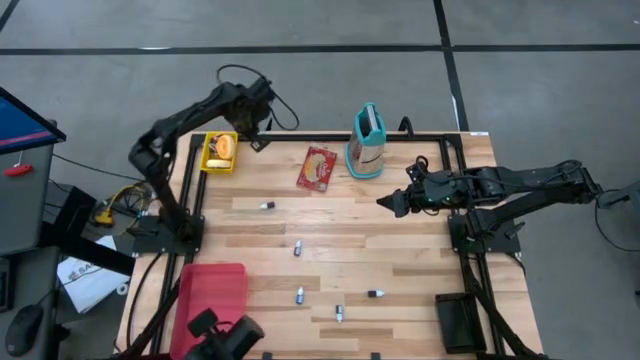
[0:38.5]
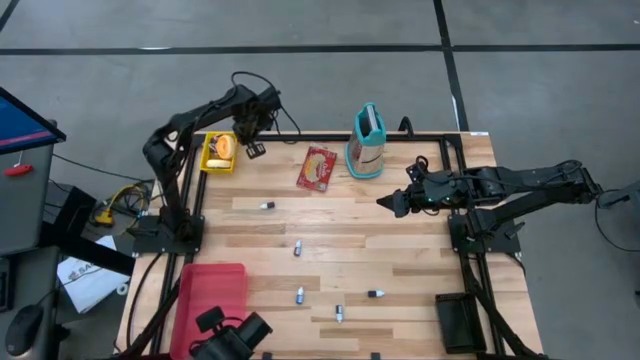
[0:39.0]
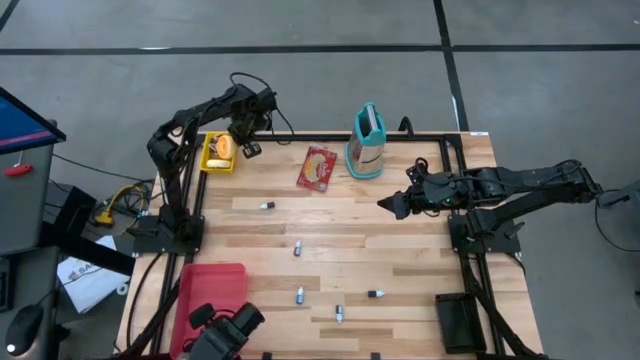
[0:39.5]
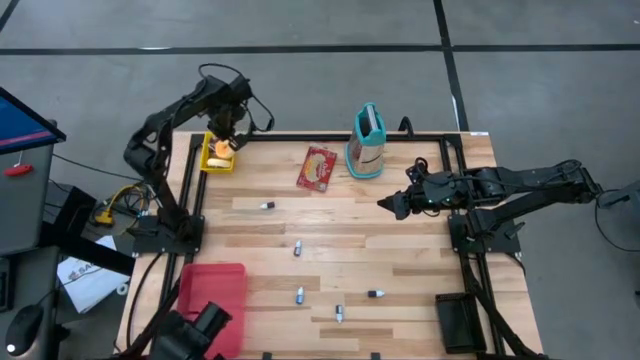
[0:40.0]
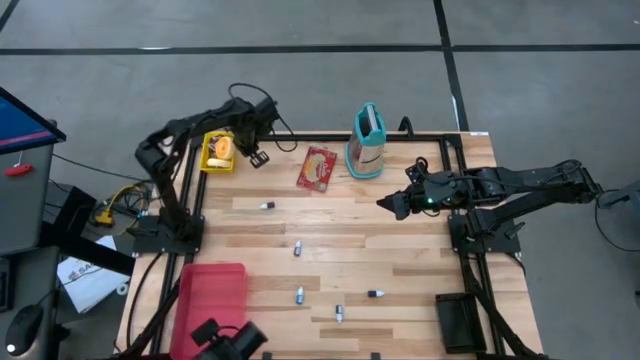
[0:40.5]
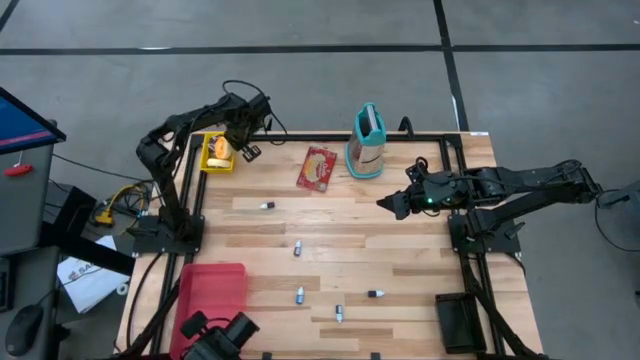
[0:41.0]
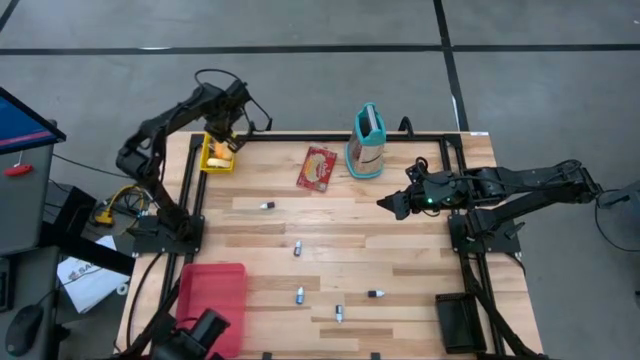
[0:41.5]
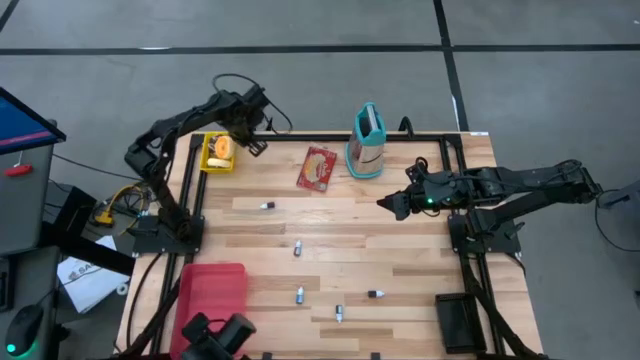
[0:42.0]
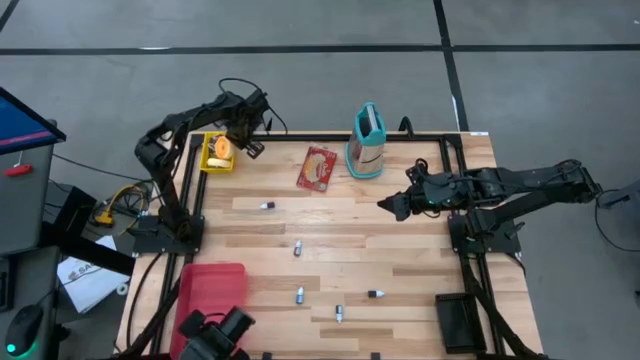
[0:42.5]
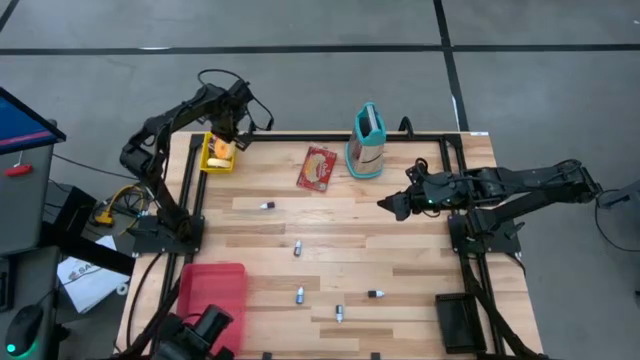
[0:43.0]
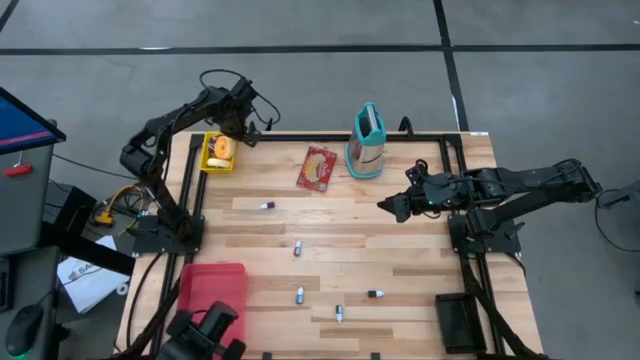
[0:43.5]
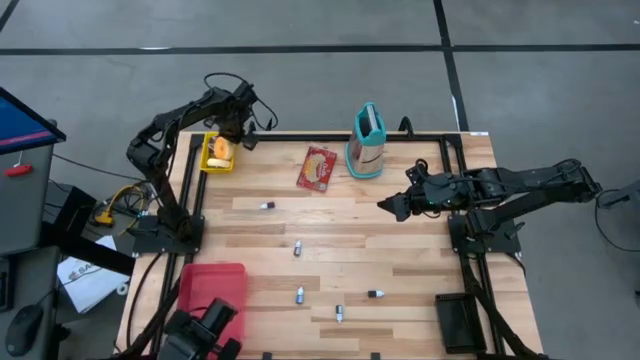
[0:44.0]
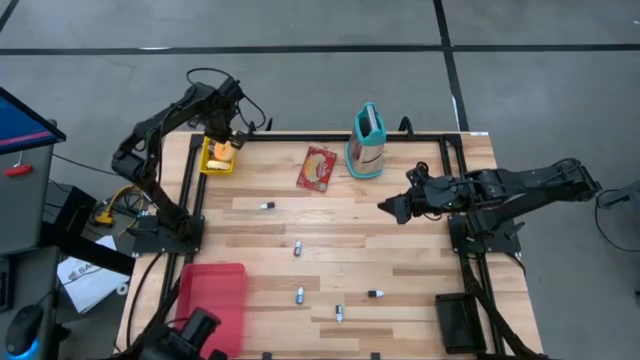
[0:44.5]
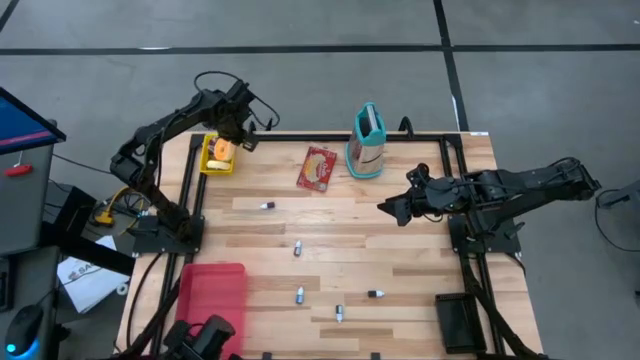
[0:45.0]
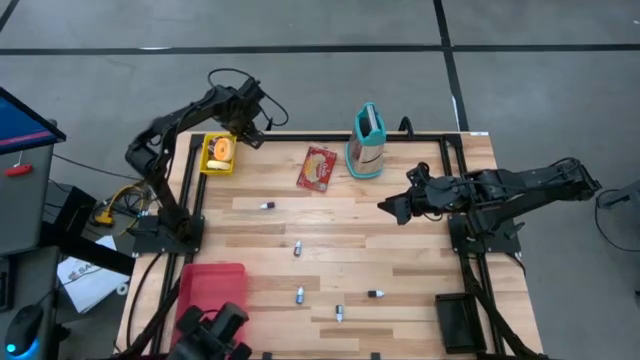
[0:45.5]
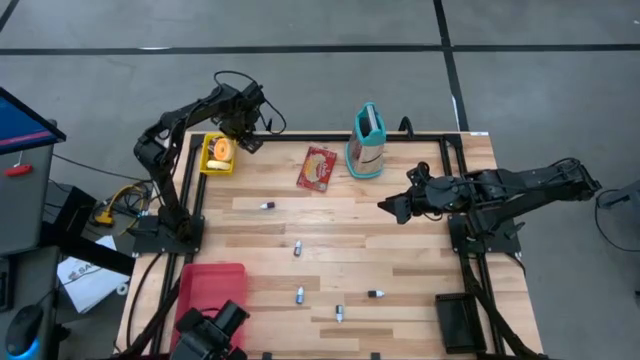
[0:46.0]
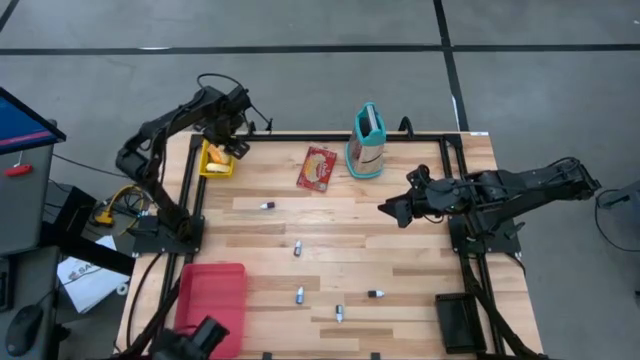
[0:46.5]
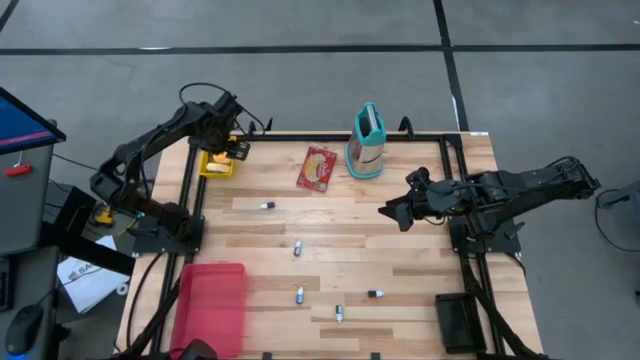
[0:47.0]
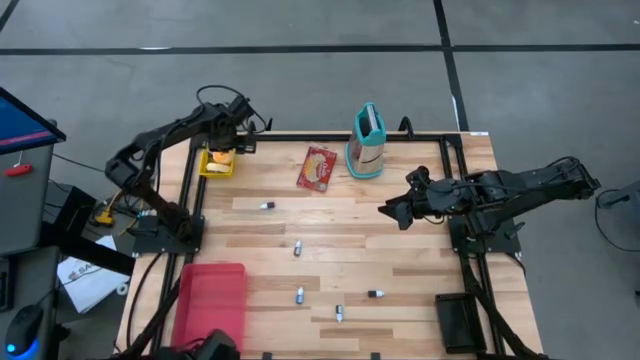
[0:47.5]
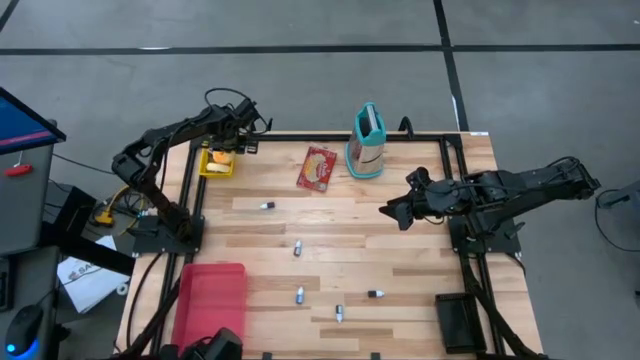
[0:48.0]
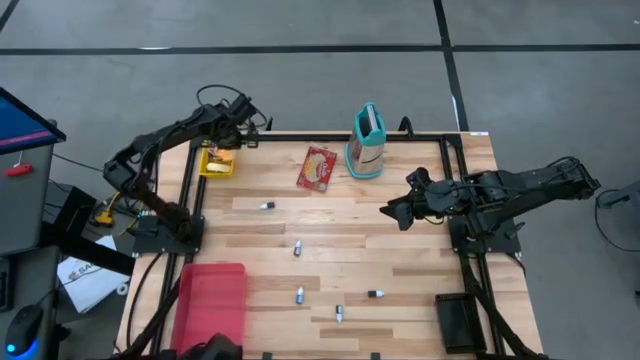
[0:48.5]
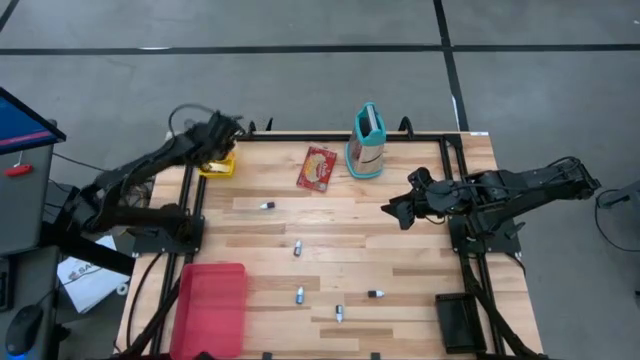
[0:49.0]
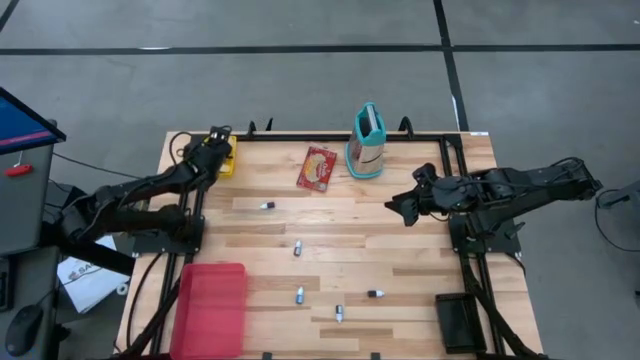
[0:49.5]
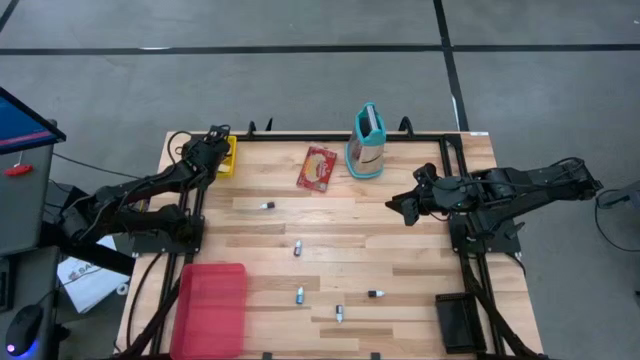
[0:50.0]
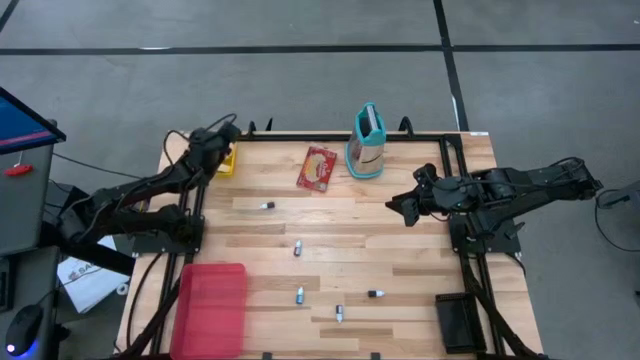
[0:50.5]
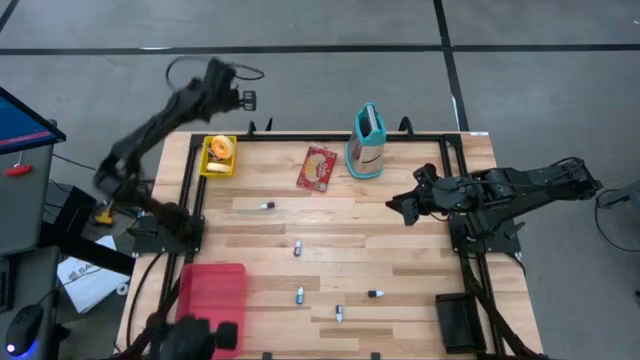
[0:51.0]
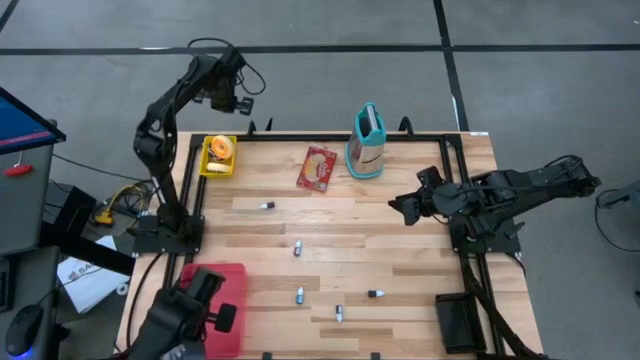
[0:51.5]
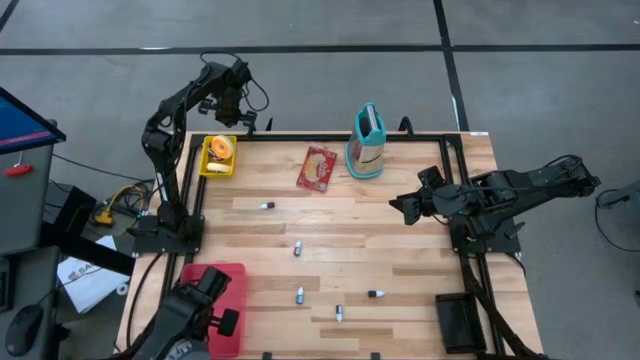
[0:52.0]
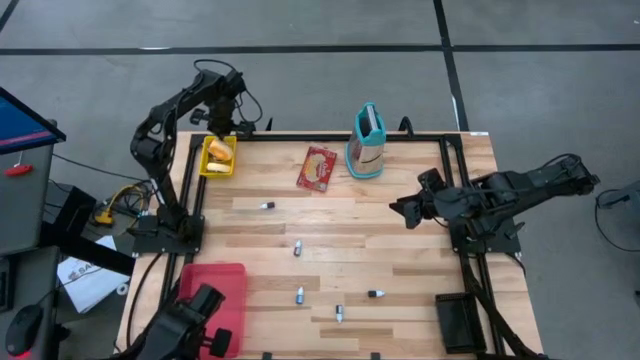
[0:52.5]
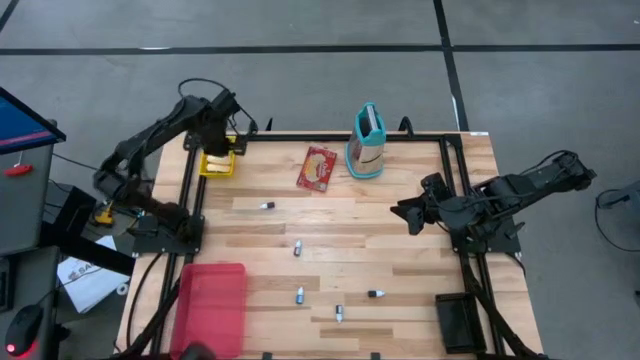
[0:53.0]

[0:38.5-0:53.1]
Put the pink donut into the yellow basket
